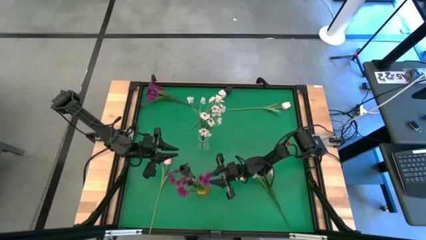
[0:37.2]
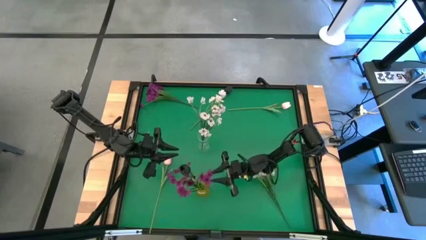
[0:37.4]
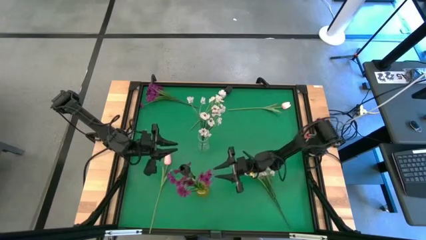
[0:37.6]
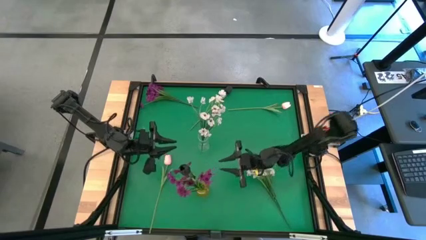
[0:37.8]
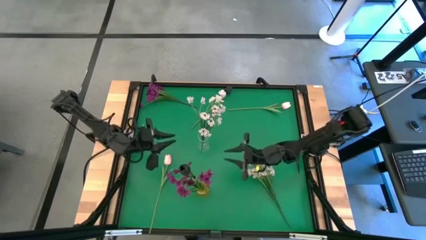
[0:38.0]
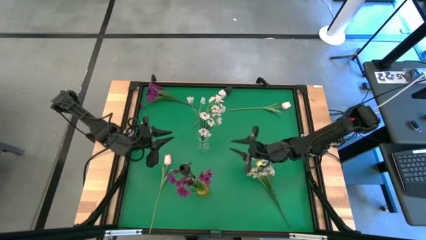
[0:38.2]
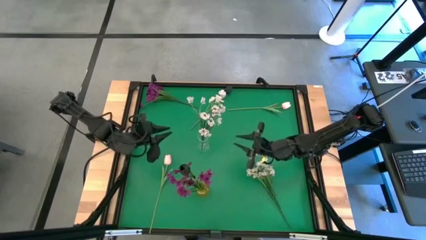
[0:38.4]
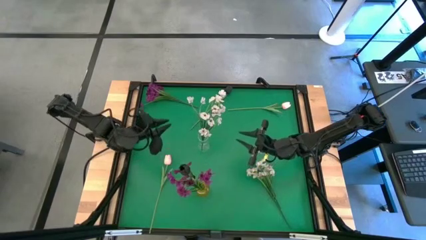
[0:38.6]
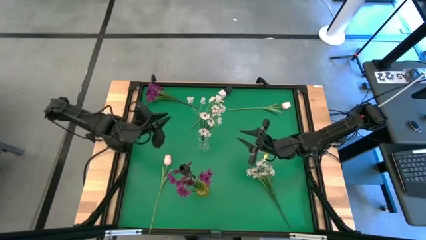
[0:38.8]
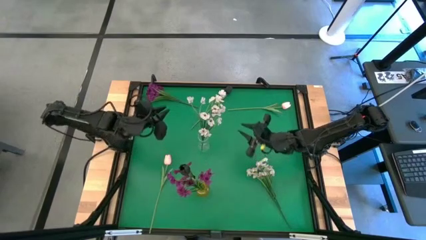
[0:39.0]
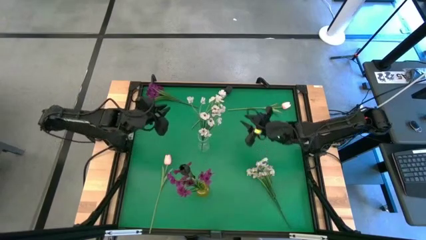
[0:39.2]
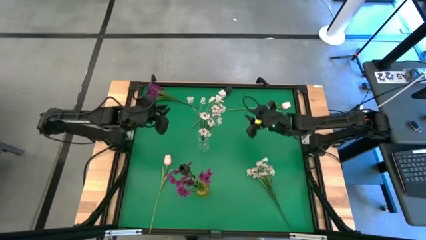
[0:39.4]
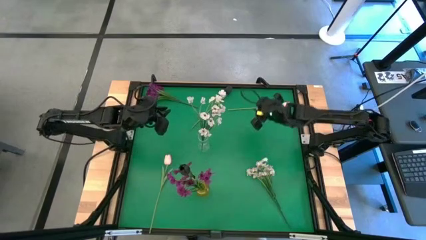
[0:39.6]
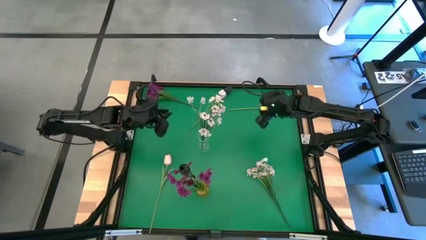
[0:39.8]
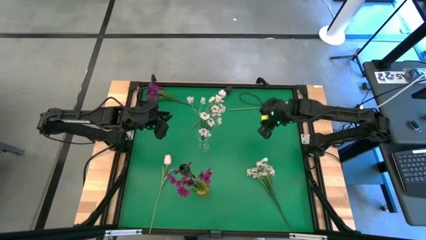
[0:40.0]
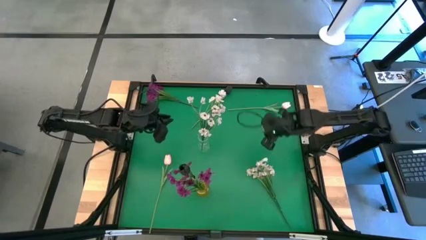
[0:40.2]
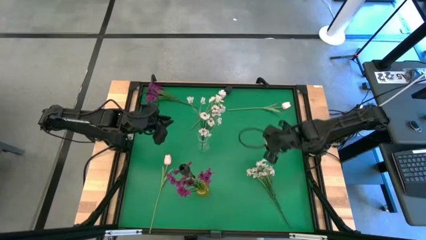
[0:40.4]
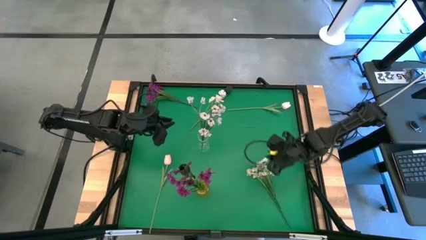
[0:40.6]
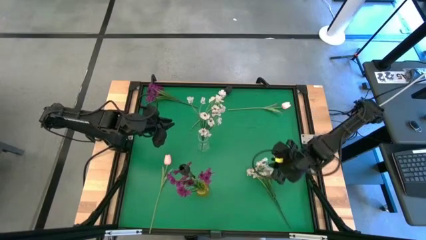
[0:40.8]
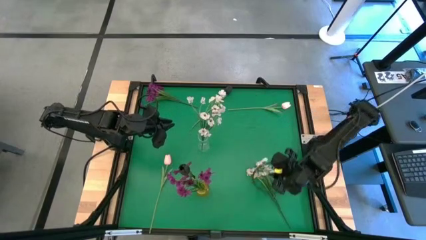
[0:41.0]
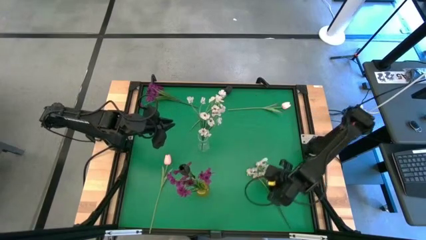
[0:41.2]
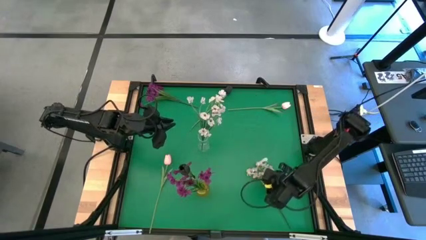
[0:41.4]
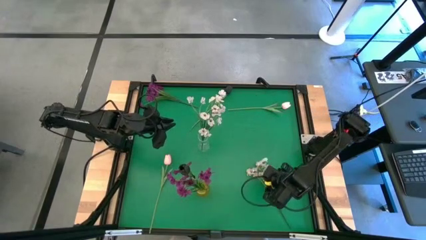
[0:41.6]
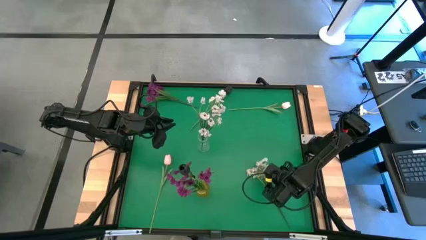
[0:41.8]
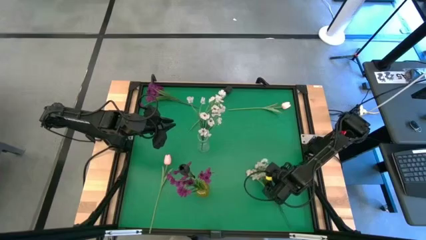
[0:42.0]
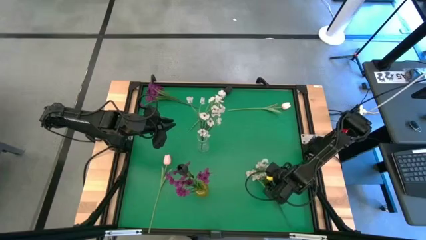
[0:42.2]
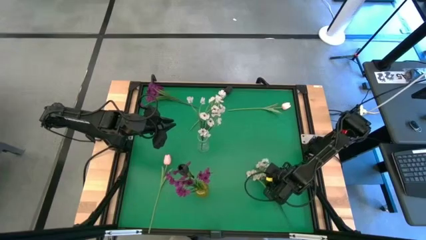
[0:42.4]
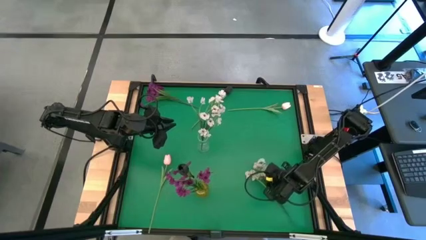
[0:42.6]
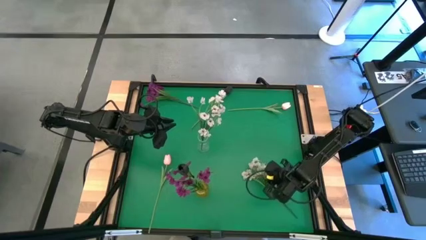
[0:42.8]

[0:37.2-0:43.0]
Task: Sort flowers into vase by color
Put the white flower into the transparent vase

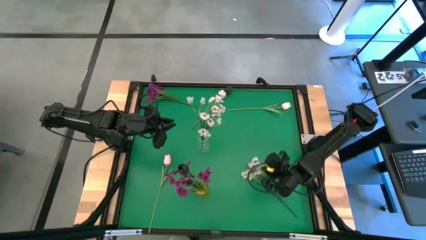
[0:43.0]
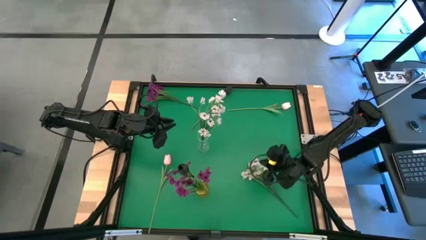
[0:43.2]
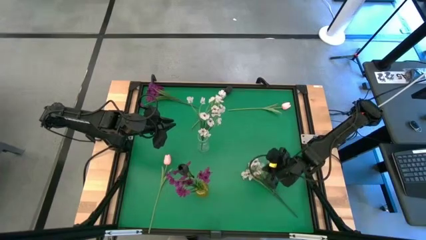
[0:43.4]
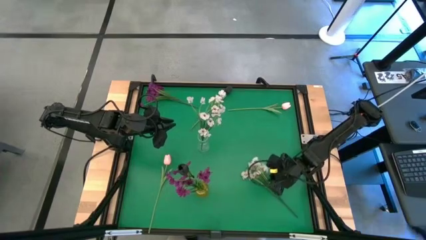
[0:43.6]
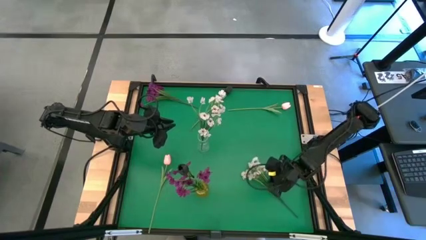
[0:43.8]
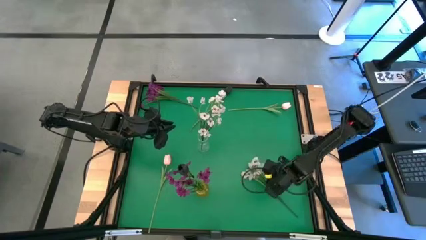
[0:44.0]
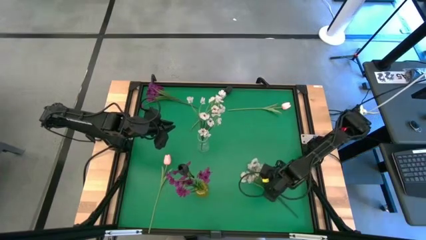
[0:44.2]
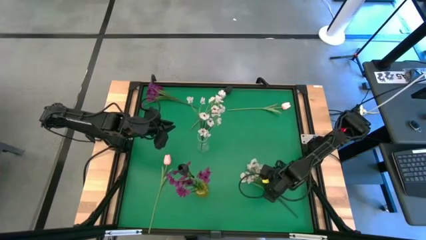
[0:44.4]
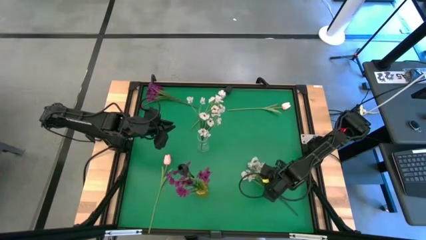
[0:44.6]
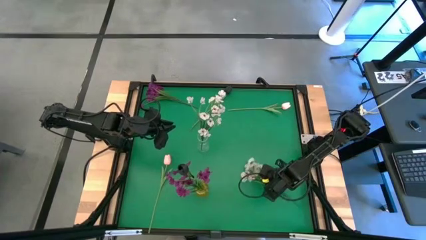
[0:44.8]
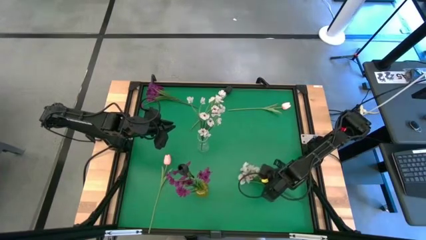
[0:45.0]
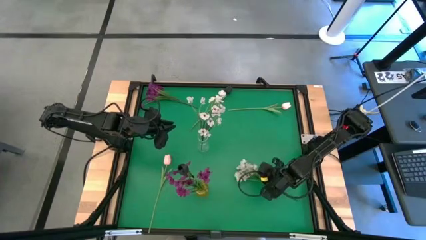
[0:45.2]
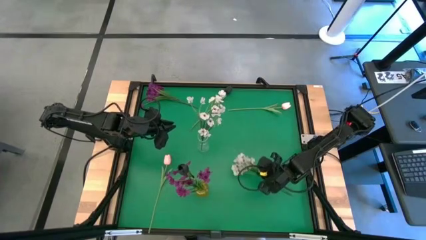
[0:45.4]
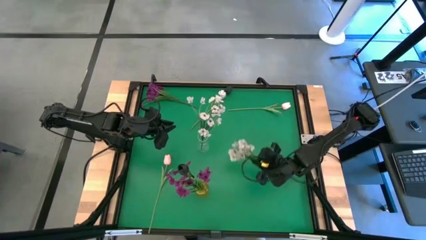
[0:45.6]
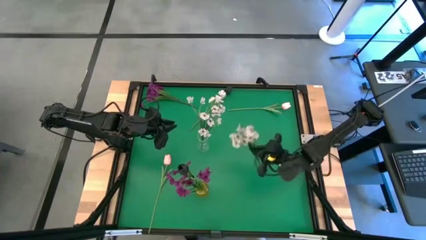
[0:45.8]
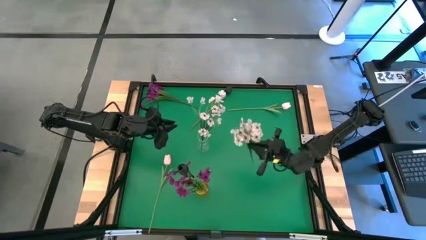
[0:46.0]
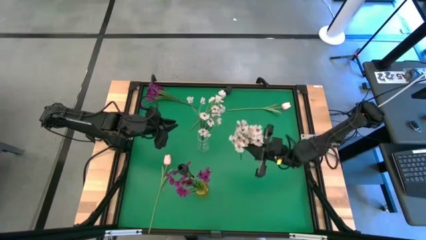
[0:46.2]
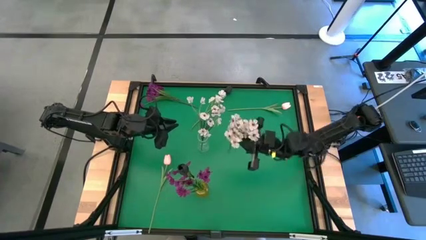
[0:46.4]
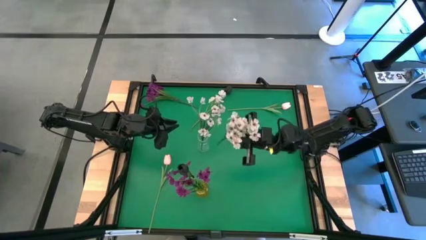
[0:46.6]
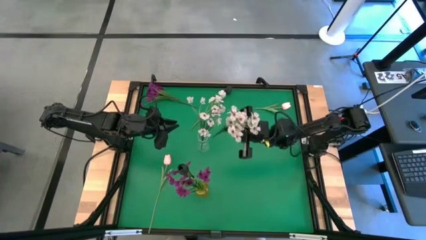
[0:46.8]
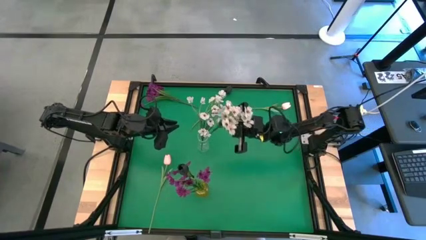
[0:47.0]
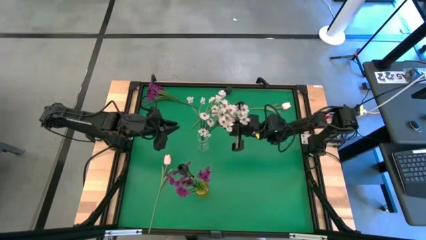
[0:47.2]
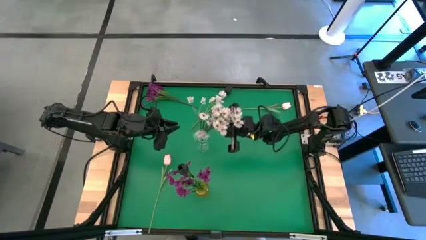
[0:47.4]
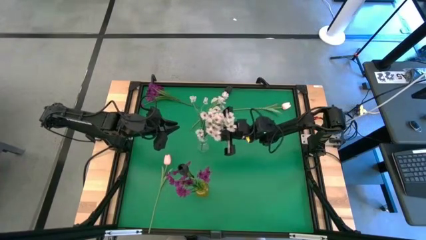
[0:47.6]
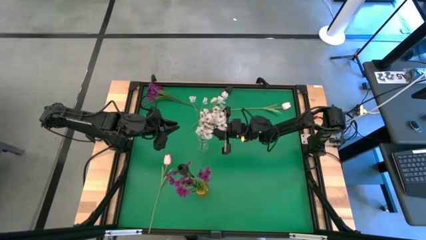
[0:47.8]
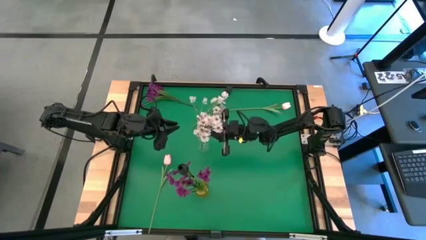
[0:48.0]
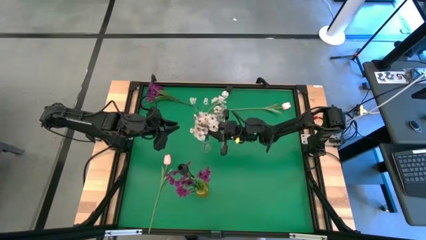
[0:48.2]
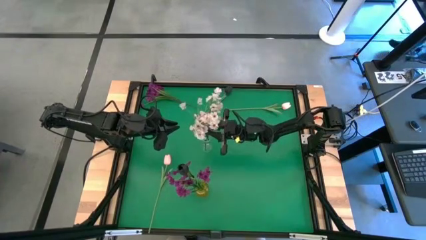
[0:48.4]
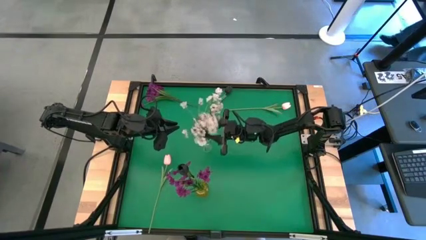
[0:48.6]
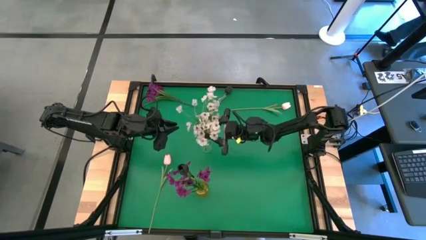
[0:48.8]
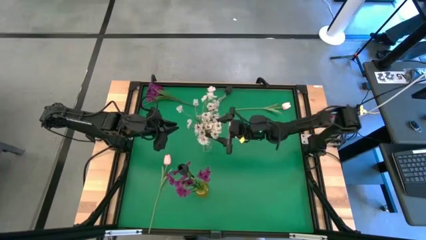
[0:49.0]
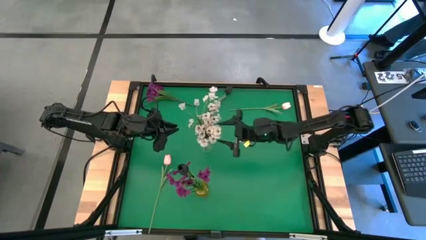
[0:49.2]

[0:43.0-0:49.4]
Put the white flower into the transparent vase

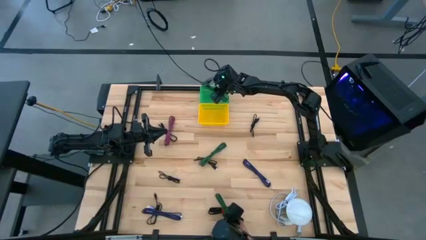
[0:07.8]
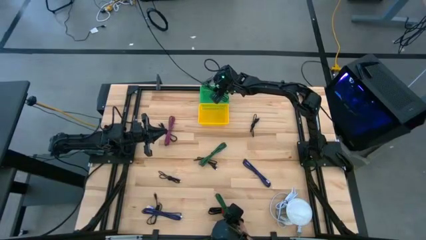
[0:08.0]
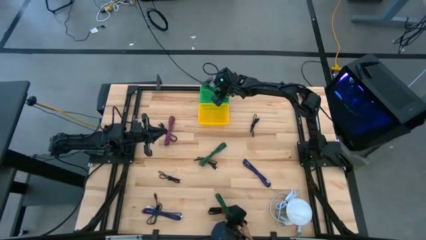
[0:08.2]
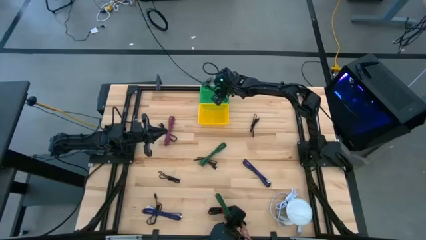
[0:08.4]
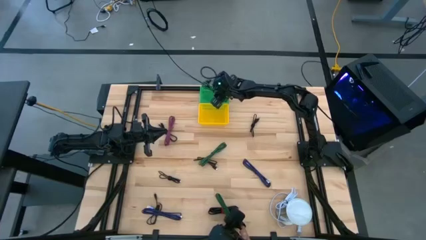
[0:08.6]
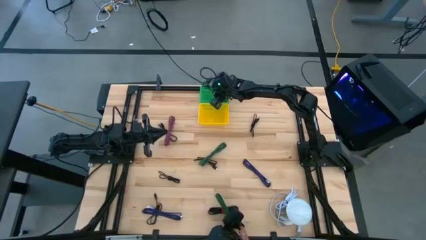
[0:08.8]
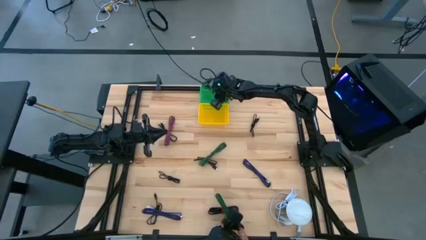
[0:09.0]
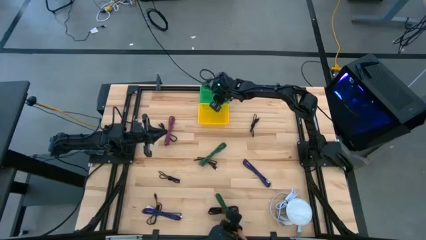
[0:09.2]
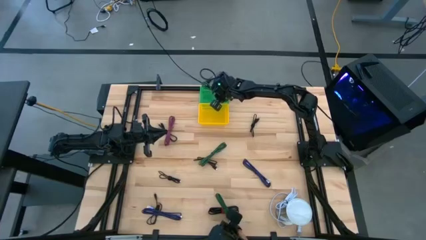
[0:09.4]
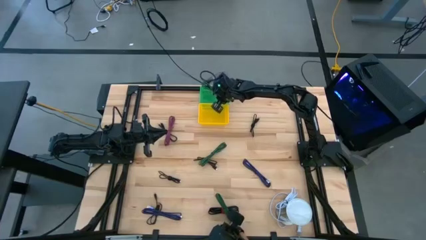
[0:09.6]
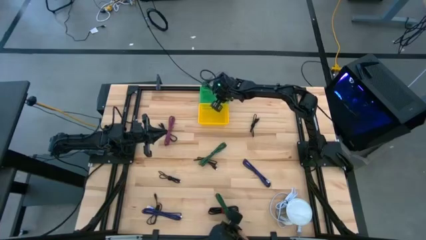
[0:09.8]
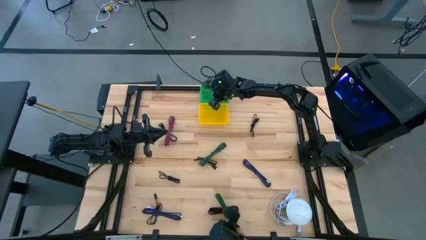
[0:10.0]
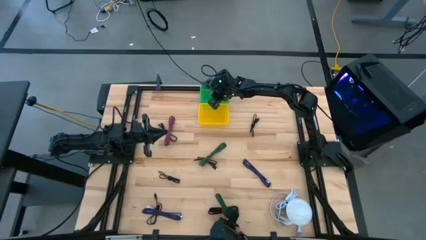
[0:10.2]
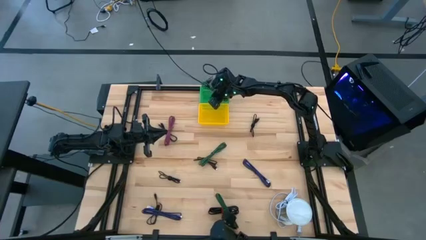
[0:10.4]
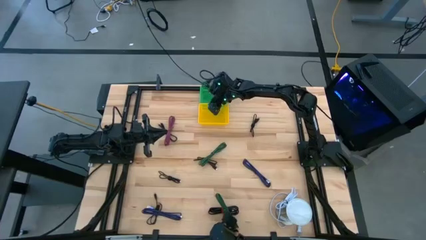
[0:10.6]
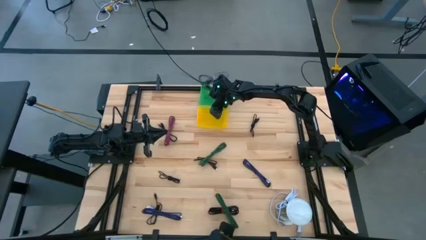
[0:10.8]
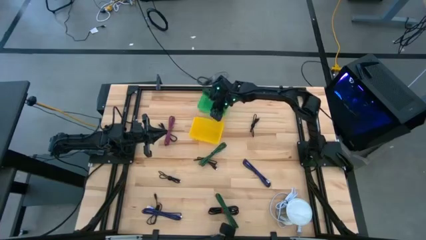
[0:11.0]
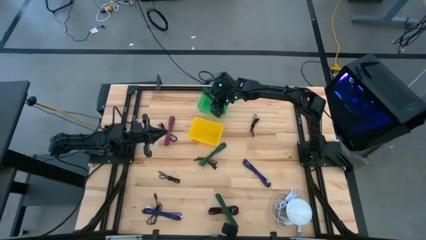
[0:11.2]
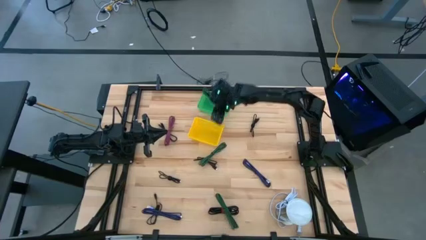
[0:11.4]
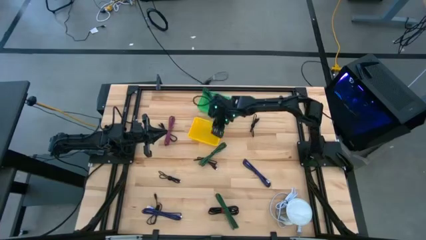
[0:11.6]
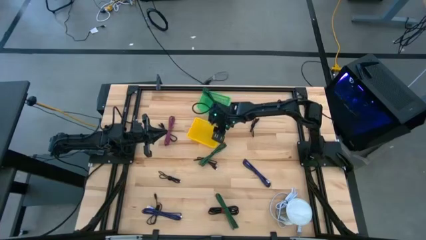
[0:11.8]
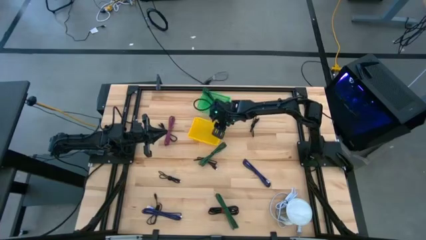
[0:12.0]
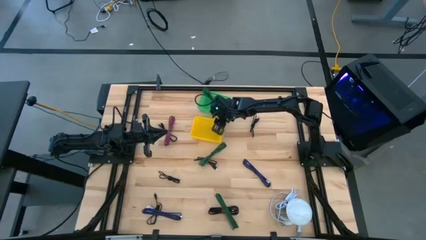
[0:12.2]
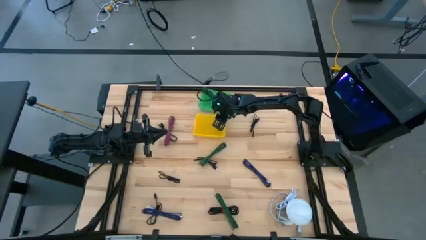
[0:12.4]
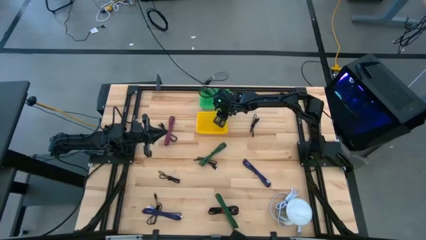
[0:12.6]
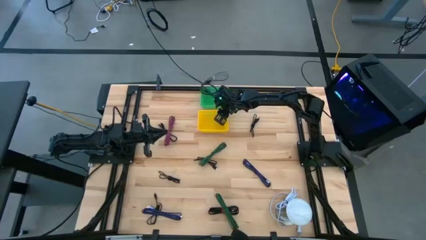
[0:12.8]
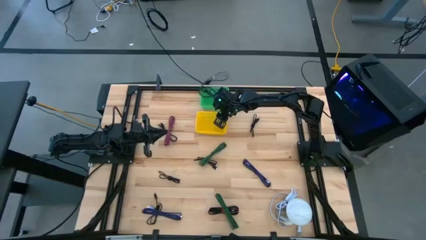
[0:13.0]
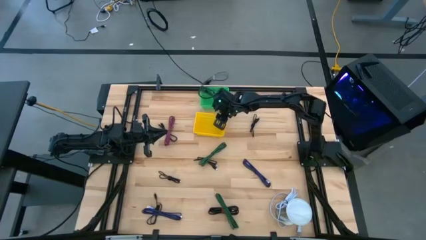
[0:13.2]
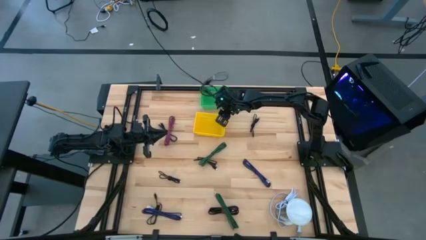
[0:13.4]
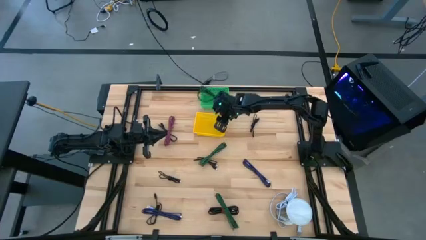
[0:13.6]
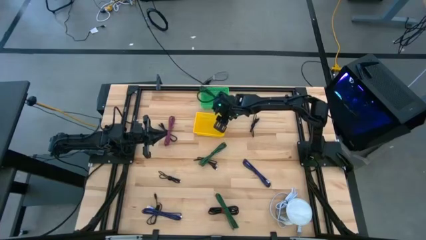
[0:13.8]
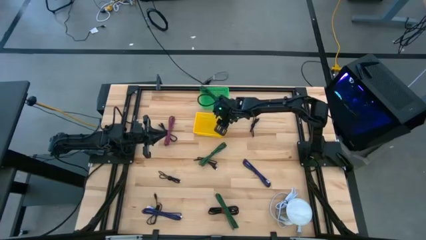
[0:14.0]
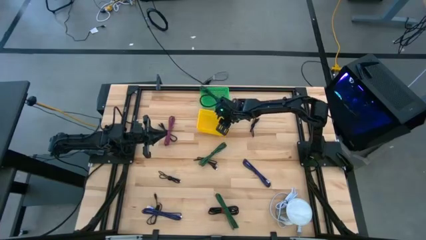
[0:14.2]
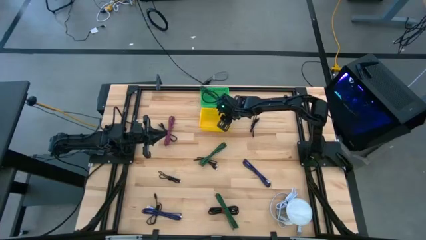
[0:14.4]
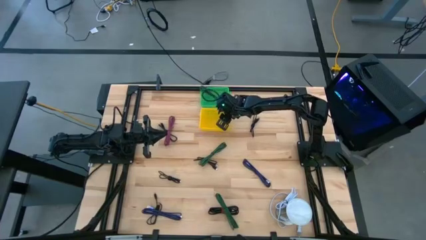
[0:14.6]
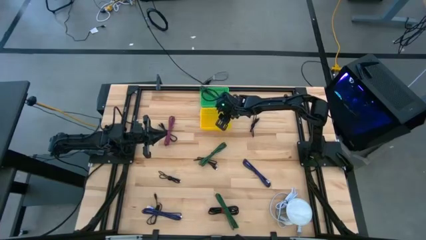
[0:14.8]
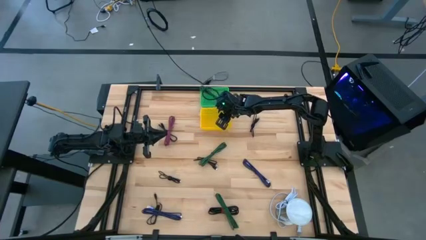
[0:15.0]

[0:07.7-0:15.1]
Task: Pick & Place USB Port
Adjust the baskets
